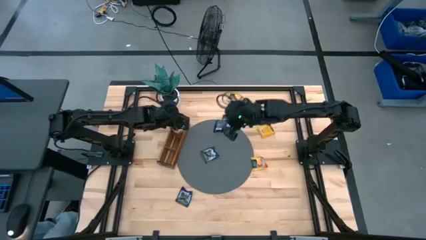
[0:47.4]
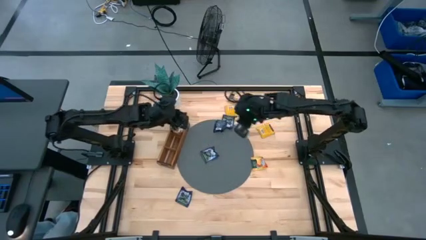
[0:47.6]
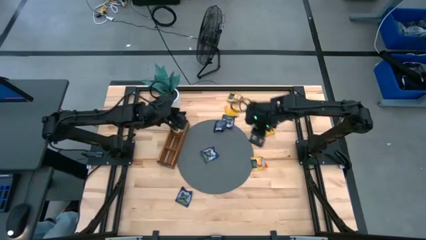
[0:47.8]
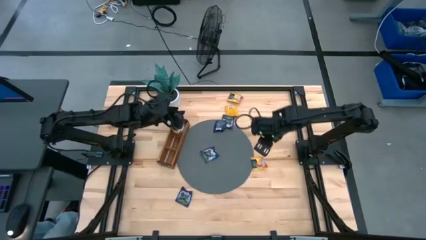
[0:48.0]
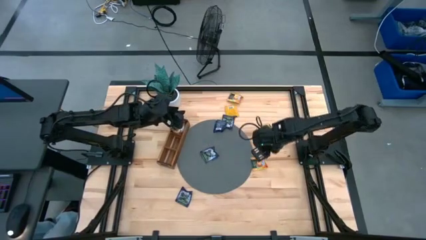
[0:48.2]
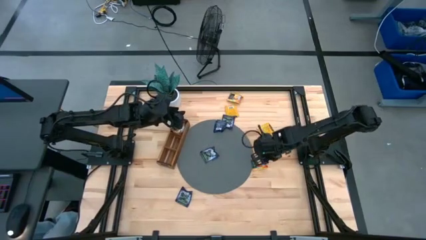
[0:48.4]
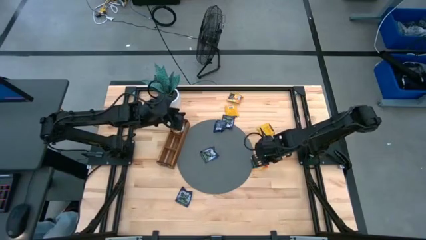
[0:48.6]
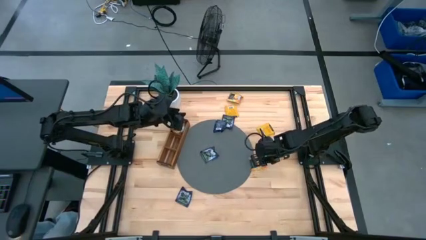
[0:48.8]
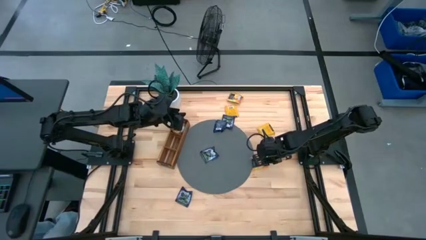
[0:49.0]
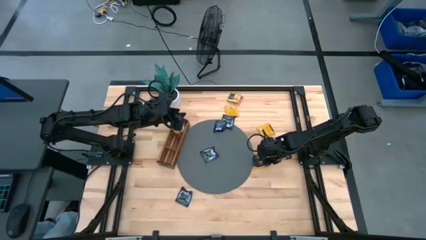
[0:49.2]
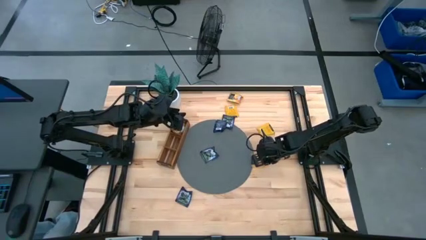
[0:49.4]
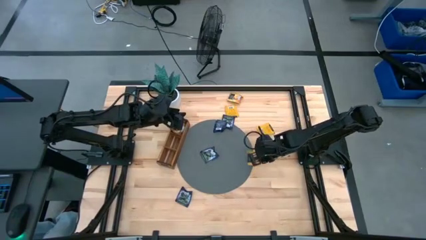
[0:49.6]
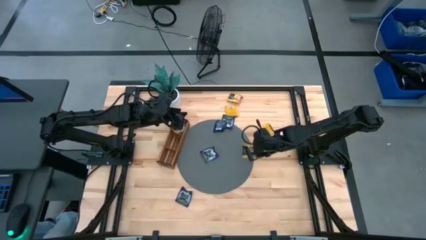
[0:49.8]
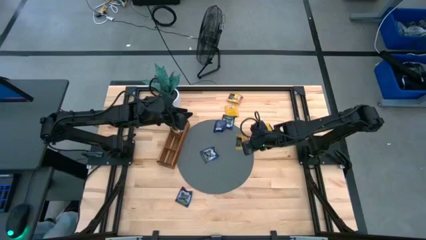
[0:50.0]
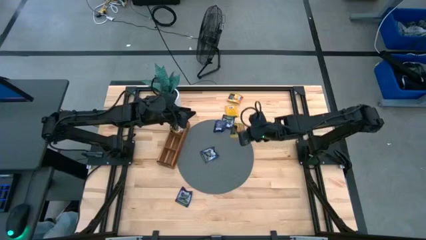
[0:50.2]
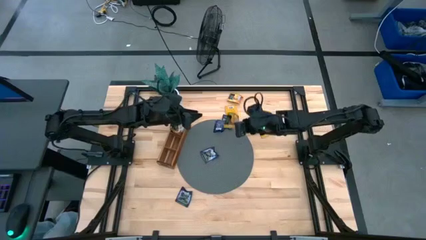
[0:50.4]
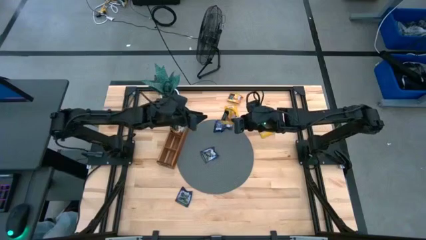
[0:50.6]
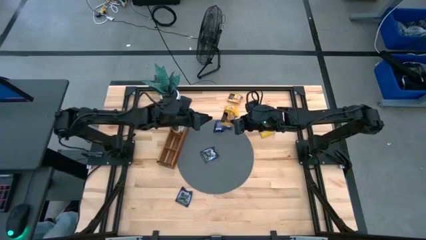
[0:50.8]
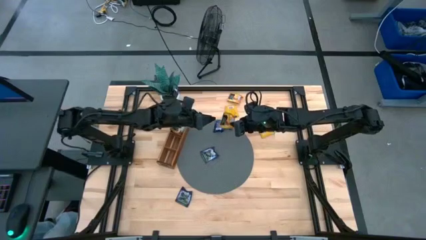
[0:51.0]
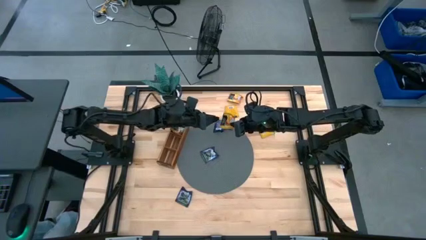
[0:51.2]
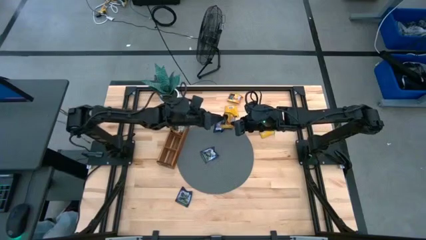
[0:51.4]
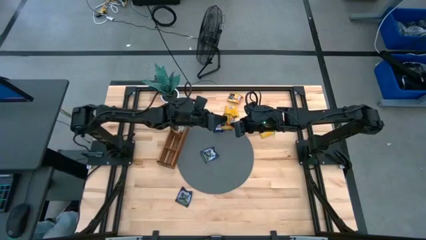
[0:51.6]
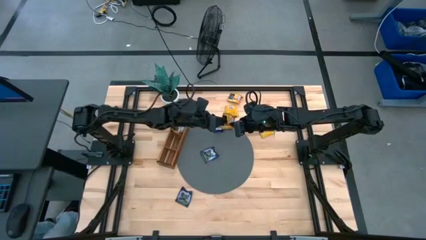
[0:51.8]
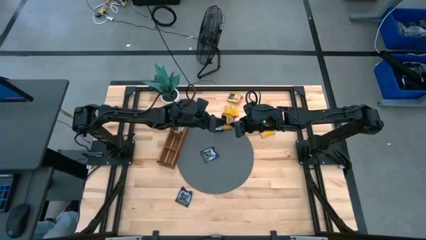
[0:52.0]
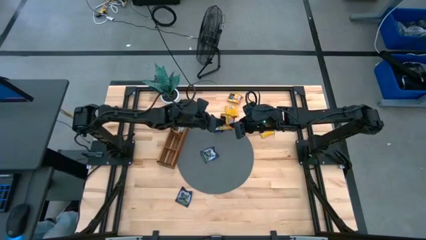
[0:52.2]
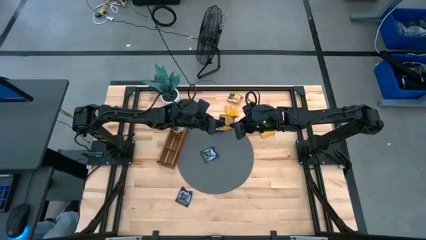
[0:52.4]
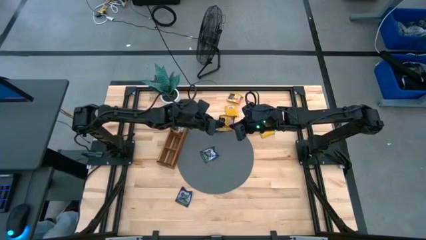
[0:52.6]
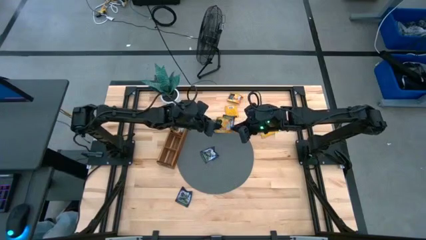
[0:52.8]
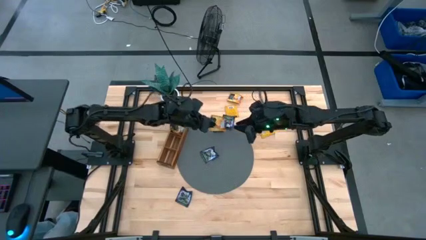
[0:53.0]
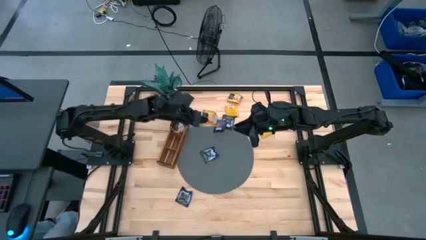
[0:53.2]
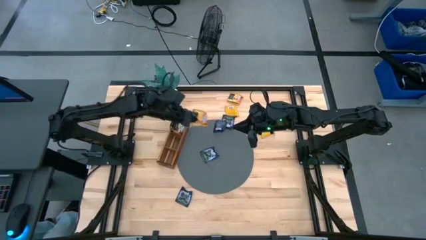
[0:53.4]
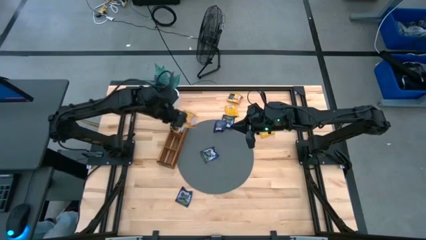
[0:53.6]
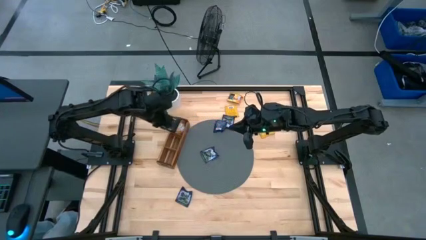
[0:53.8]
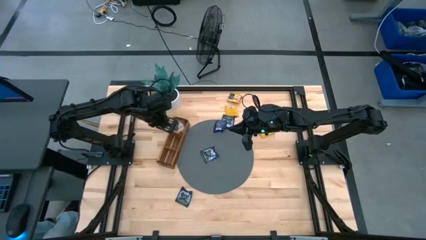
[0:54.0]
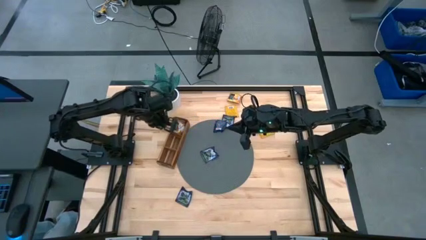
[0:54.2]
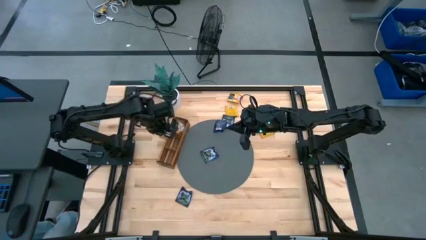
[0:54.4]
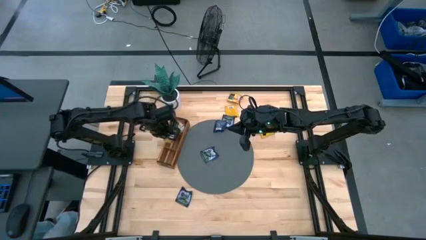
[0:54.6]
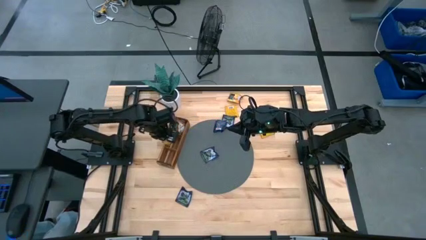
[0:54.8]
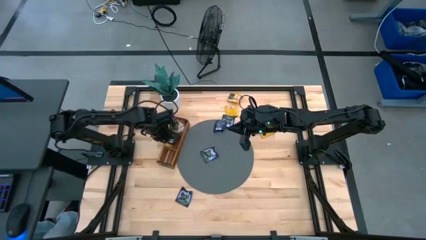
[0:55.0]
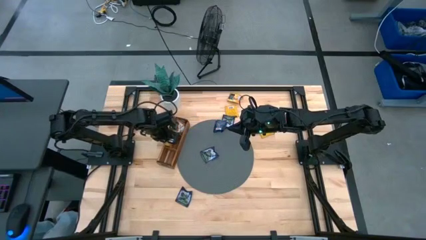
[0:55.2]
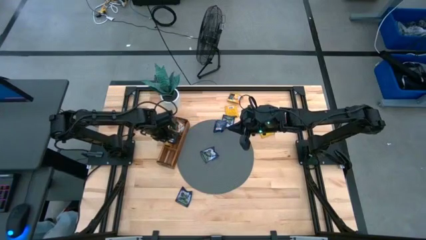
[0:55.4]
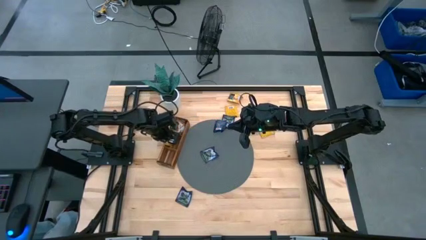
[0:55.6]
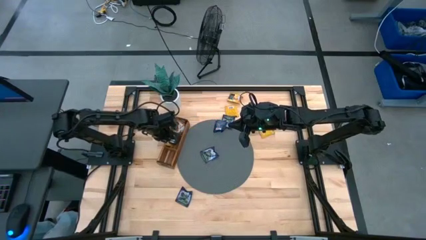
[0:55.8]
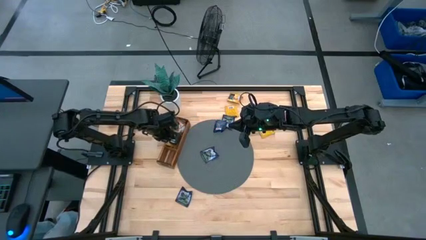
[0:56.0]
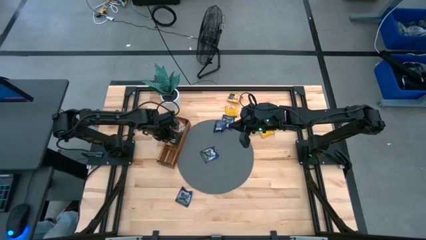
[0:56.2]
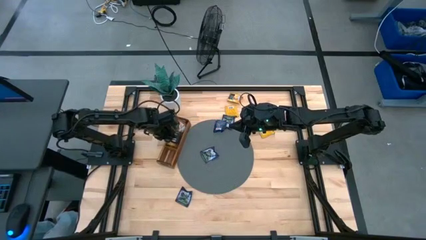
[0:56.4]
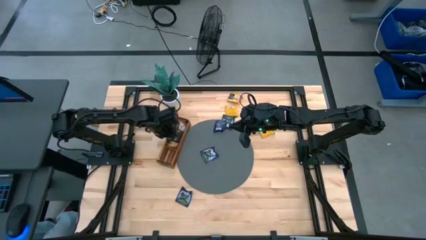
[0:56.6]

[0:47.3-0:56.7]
Task: Pick & Place Tea
Put the yellow tea bag into the middle section of the wooden organizer

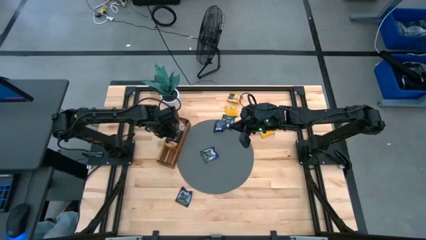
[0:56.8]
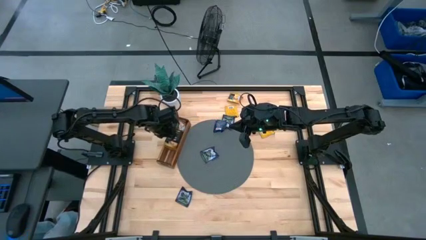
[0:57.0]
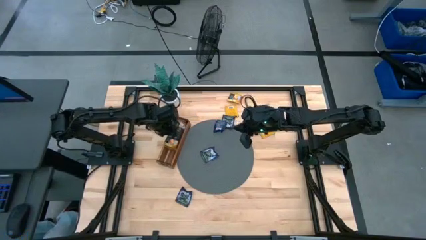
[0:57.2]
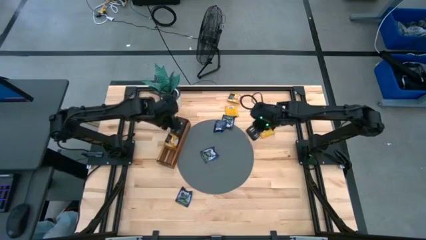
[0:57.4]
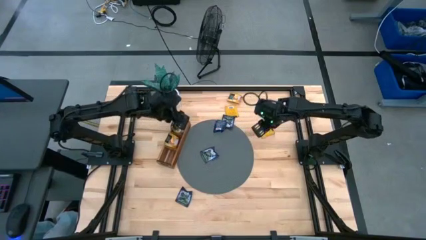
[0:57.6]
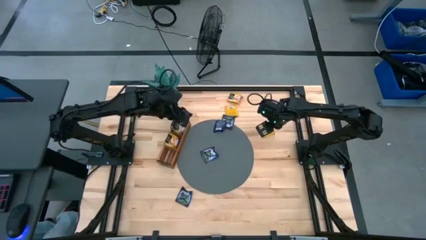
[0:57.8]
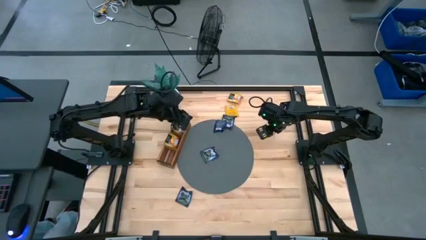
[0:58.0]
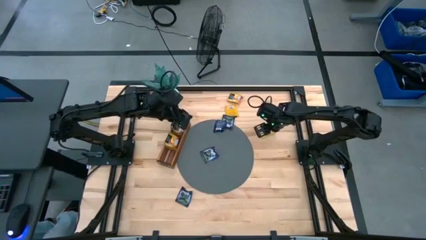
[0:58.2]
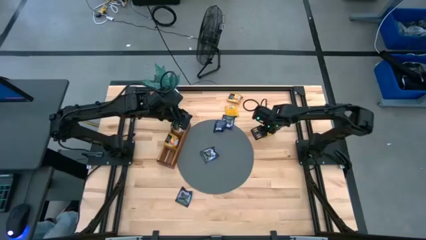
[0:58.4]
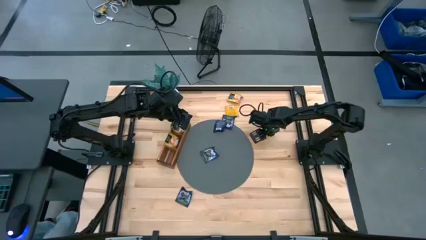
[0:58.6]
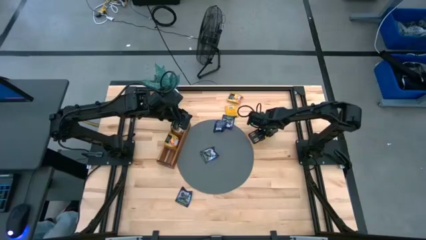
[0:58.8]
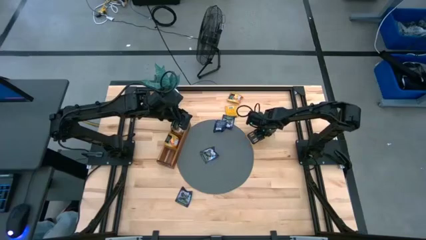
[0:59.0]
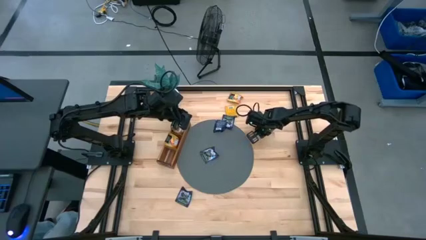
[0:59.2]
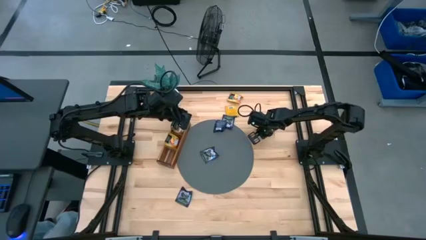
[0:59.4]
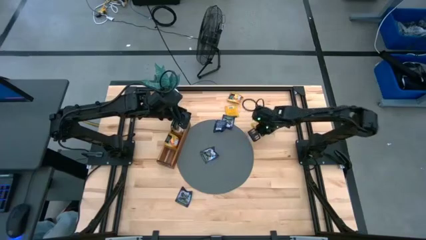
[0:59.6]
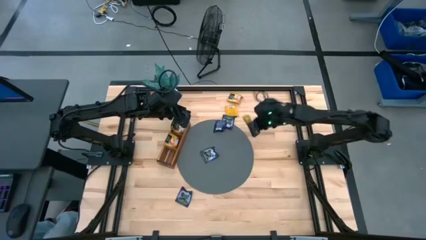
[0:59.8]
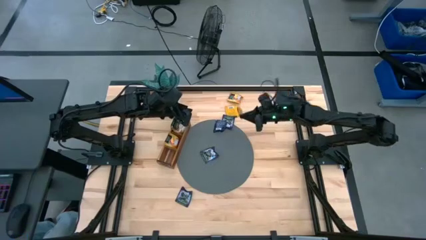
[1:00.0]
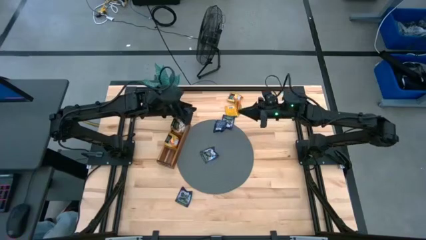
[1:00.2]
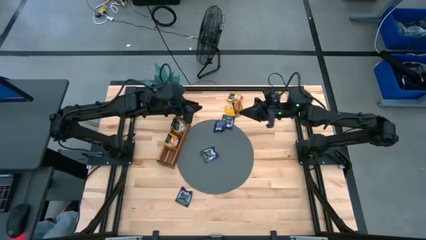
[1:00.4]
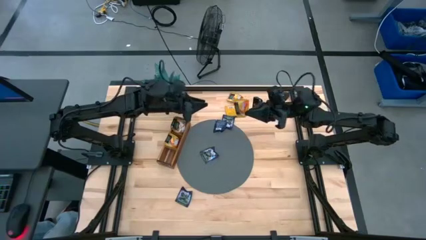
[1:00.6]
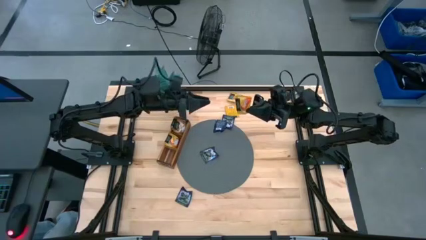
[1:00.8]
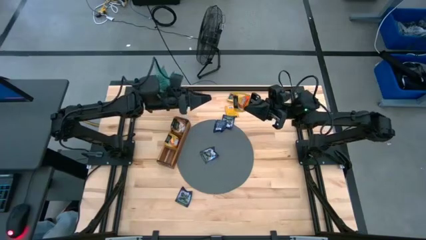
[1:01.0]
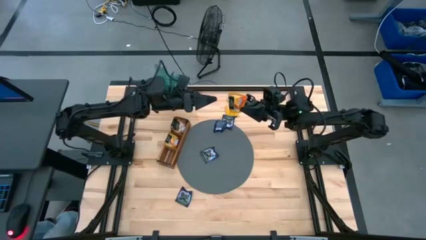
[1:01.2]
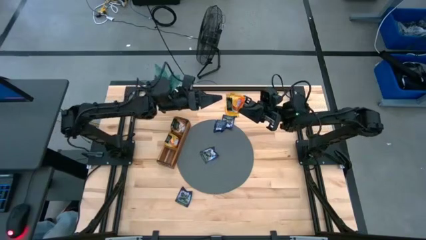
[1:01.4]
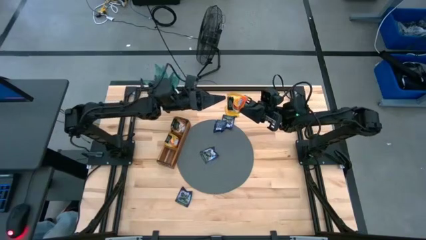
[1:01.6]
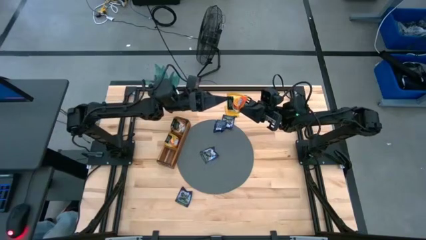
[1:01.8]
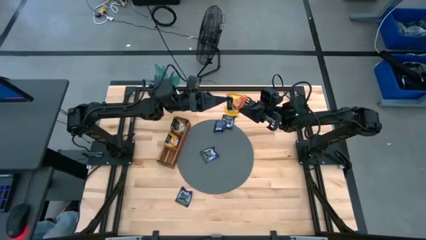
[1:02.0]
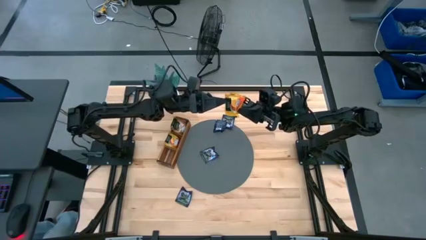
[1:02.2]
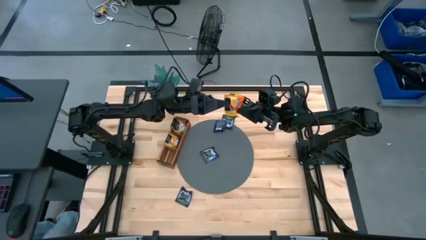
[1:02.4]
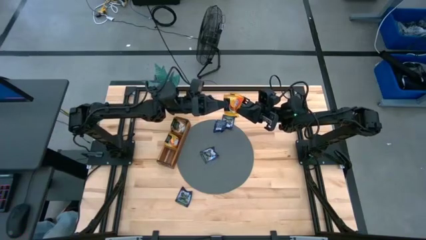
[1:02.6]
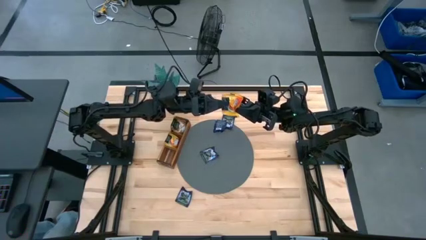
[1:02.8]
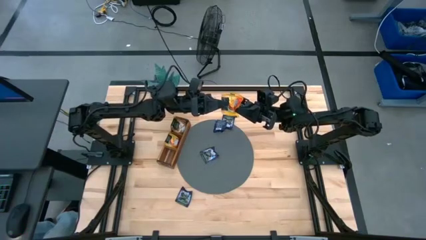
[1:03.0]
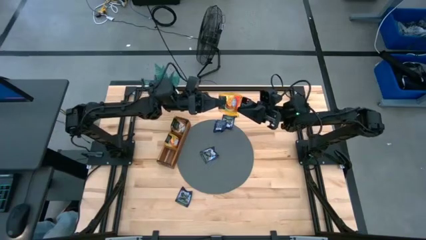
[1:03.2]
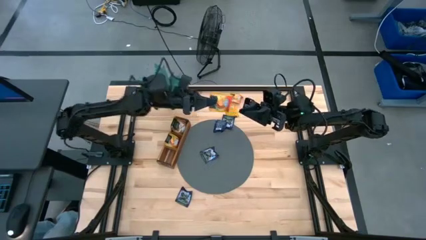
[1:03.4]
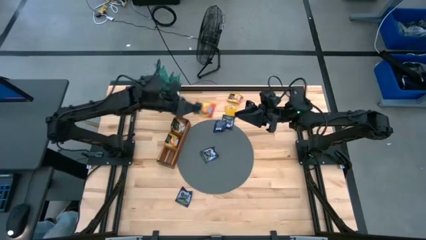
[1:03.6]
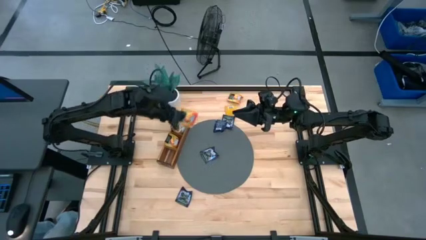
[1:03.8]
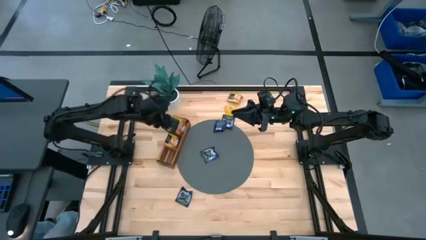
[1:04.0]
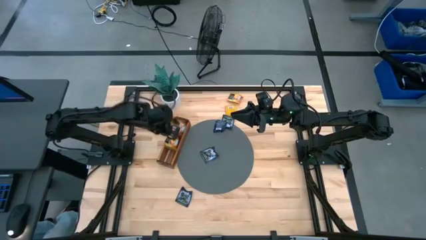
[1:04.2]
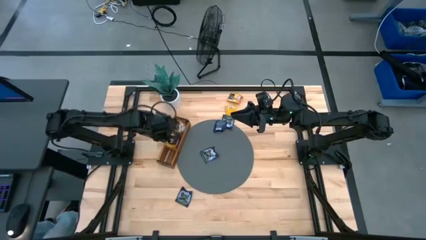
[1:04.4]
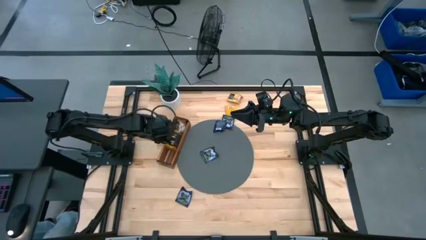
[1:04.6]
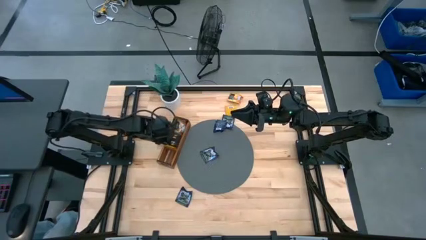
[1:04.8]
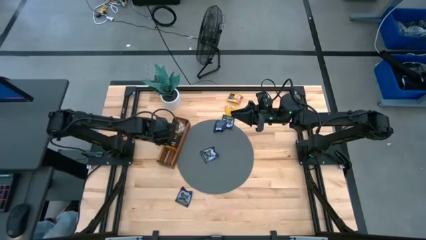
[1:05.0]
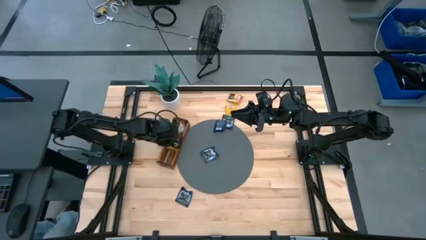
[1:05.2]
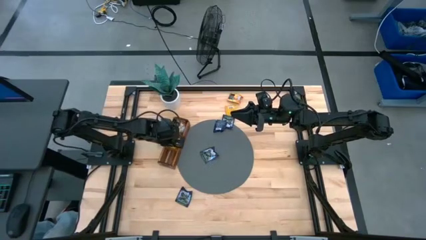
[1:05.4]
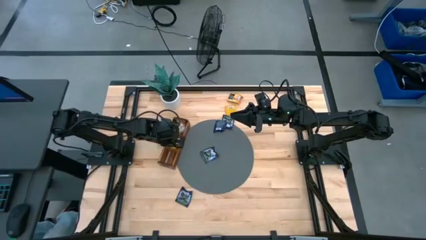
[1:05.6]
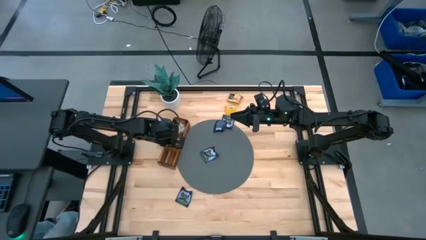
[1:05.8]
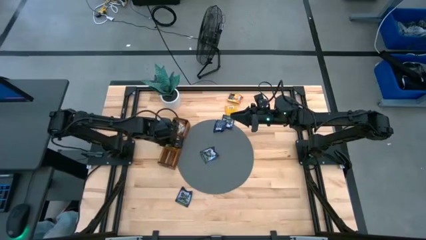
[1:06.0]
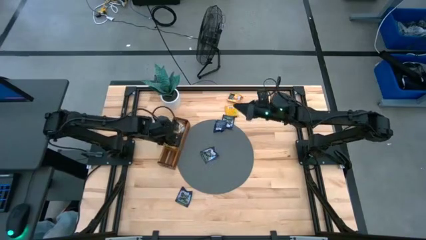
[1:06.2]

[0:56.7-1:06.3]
Put the yellow tea bag into the middle section of the wooden organizer
